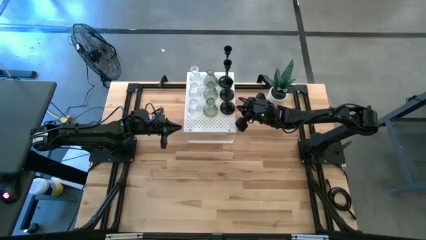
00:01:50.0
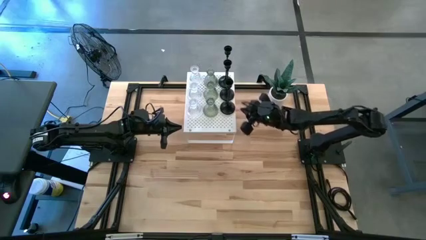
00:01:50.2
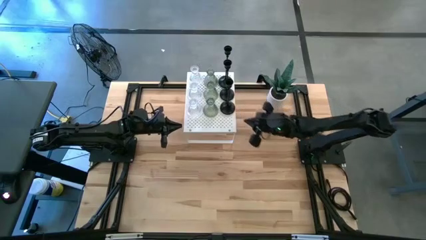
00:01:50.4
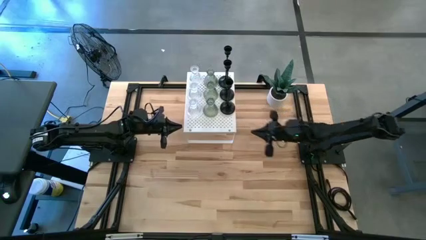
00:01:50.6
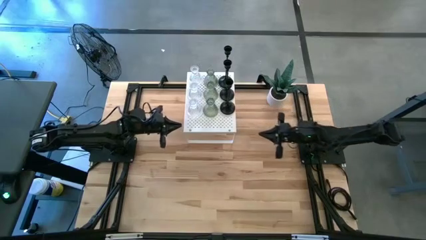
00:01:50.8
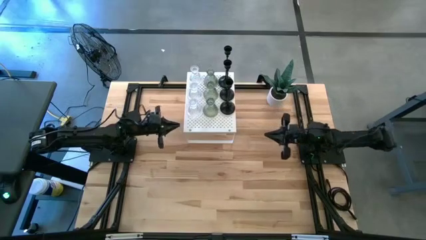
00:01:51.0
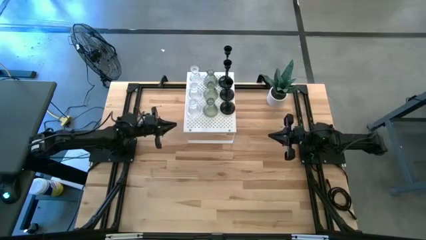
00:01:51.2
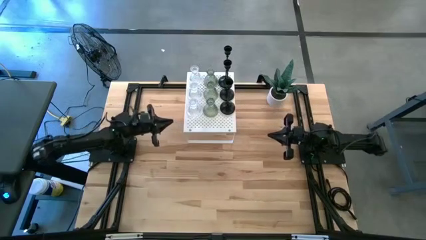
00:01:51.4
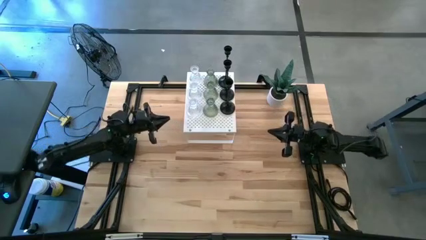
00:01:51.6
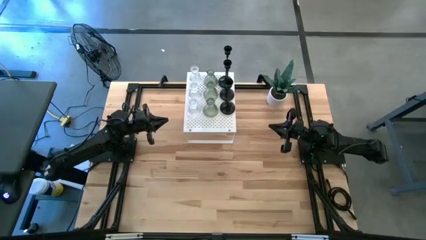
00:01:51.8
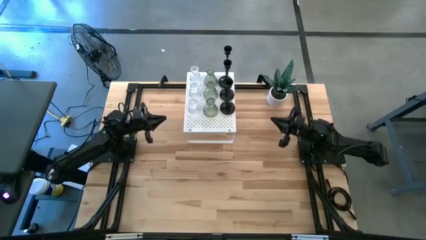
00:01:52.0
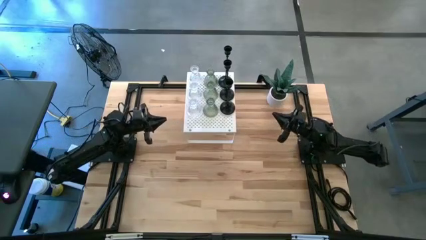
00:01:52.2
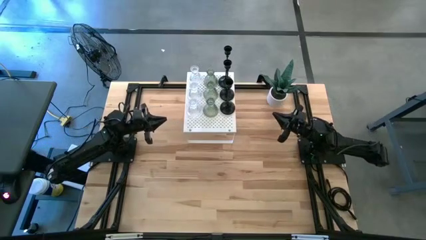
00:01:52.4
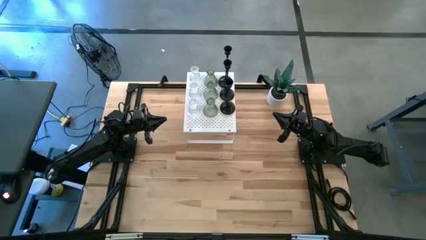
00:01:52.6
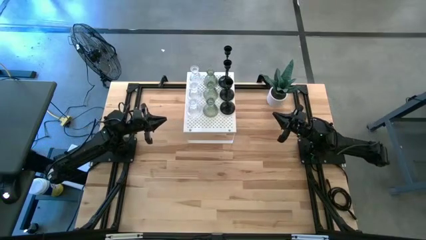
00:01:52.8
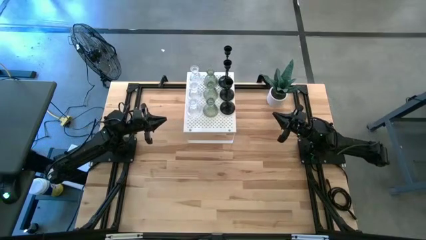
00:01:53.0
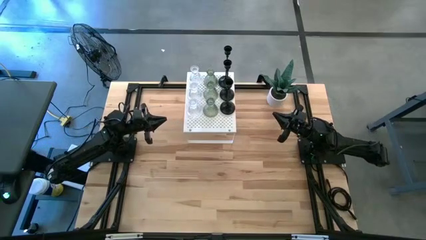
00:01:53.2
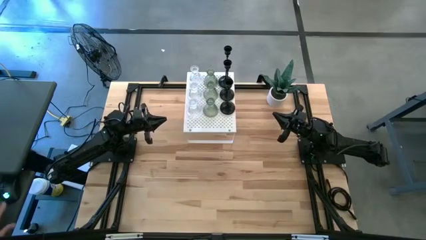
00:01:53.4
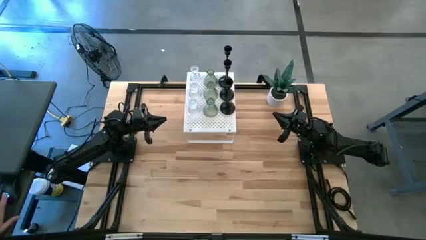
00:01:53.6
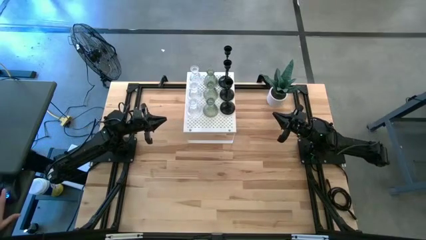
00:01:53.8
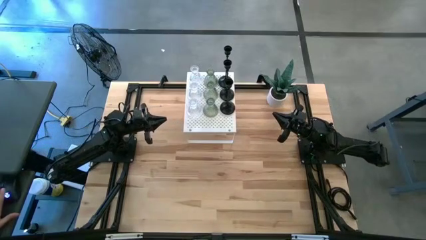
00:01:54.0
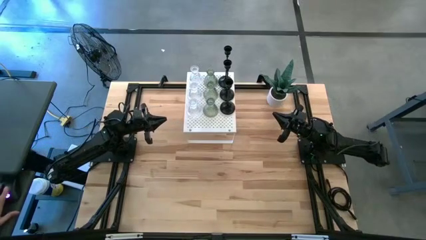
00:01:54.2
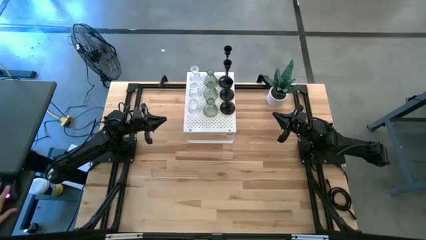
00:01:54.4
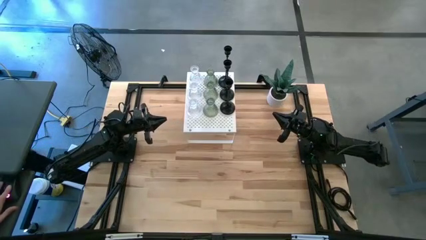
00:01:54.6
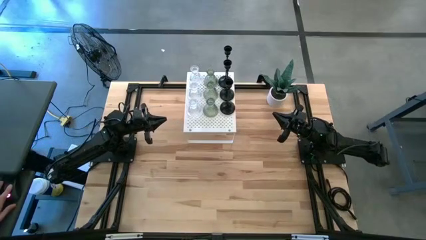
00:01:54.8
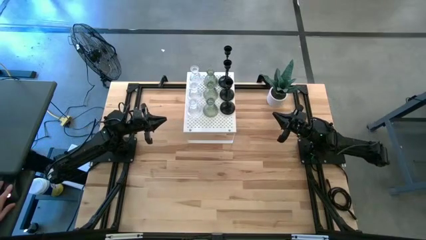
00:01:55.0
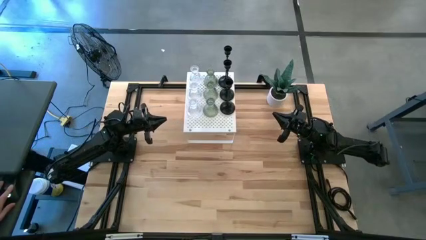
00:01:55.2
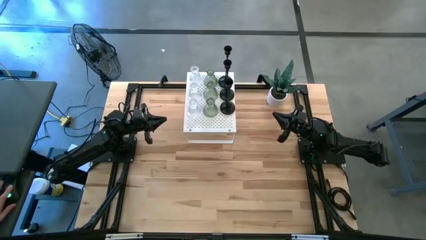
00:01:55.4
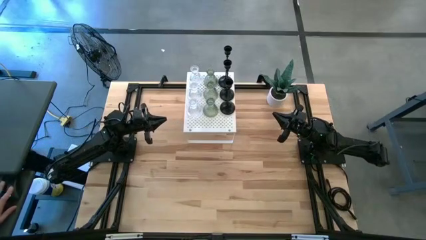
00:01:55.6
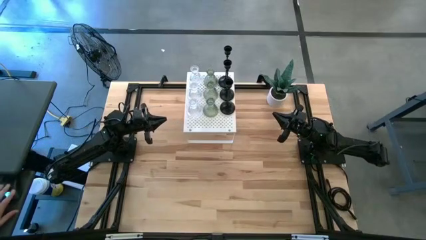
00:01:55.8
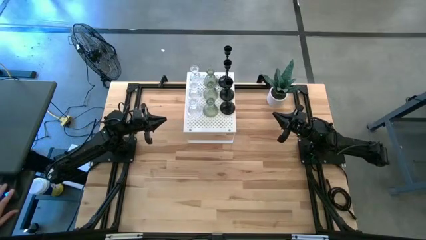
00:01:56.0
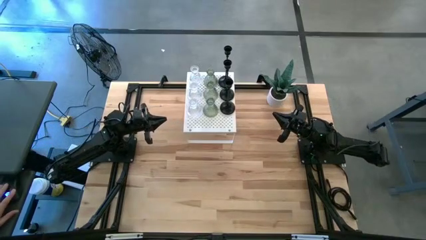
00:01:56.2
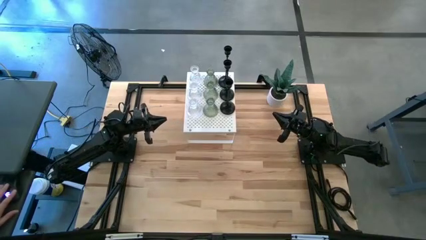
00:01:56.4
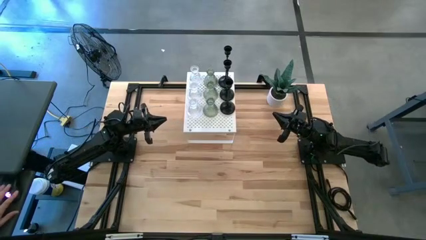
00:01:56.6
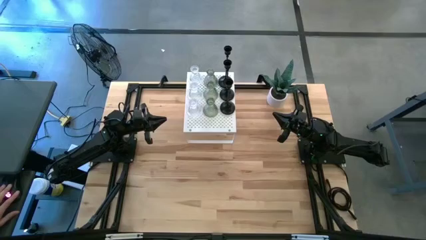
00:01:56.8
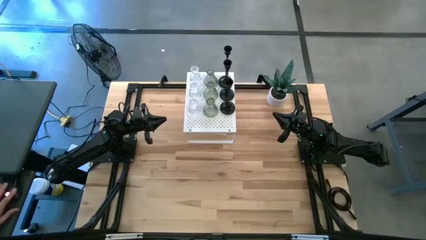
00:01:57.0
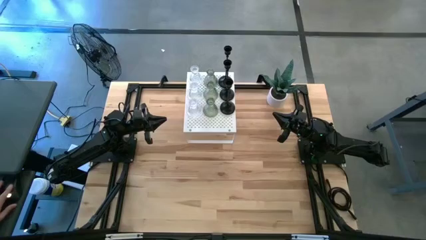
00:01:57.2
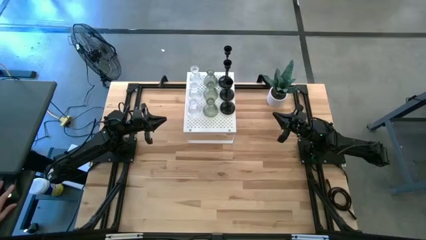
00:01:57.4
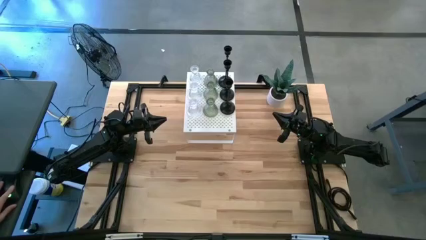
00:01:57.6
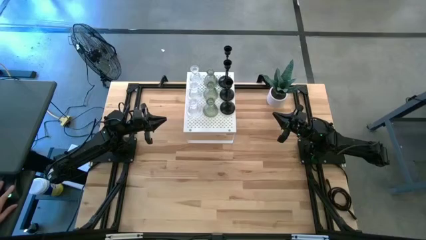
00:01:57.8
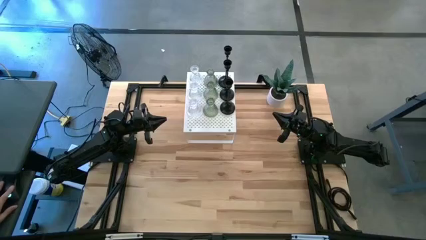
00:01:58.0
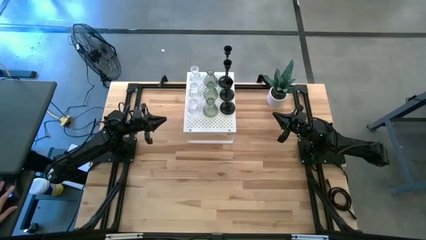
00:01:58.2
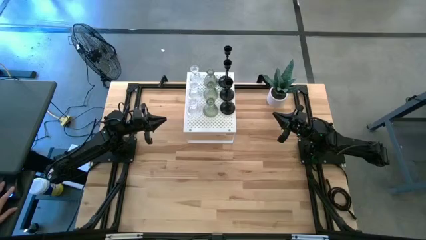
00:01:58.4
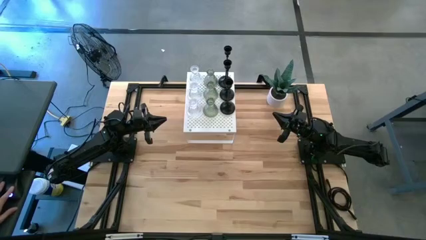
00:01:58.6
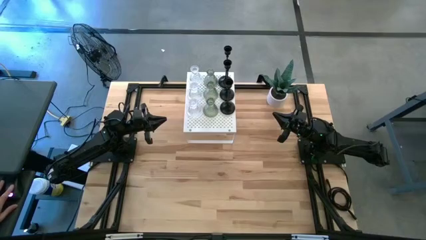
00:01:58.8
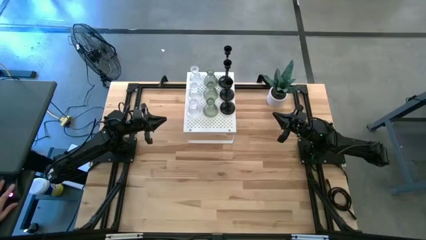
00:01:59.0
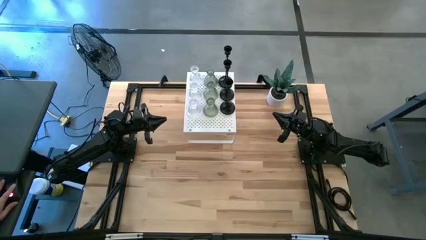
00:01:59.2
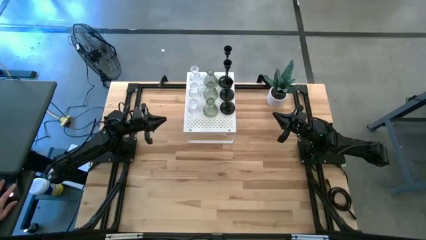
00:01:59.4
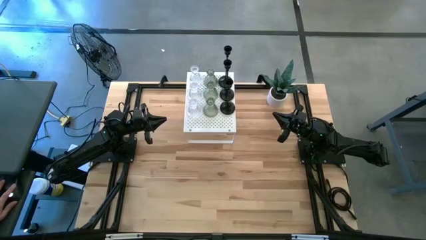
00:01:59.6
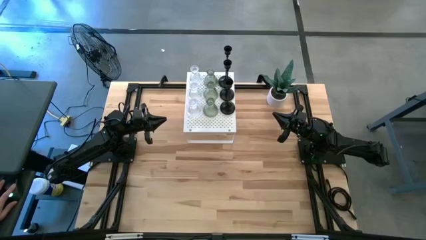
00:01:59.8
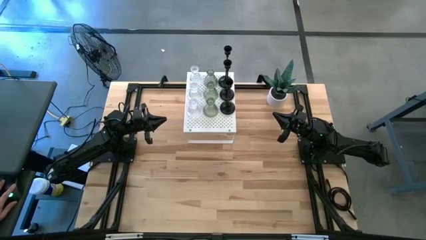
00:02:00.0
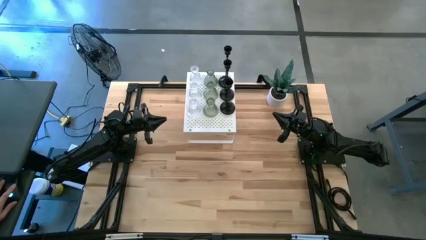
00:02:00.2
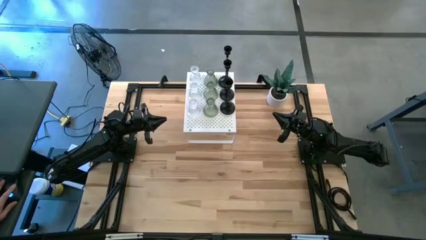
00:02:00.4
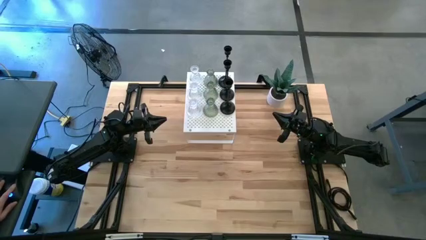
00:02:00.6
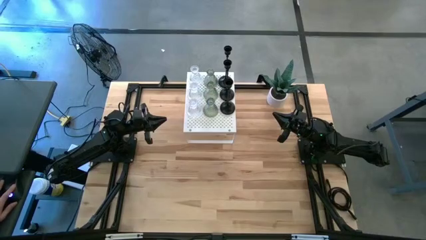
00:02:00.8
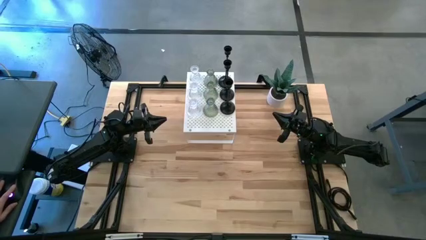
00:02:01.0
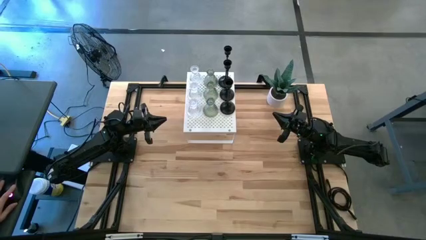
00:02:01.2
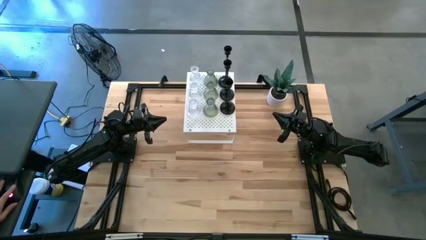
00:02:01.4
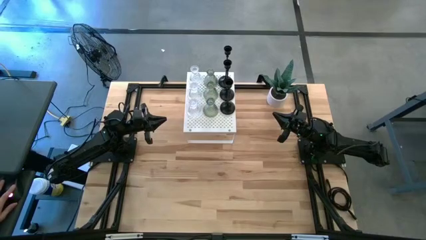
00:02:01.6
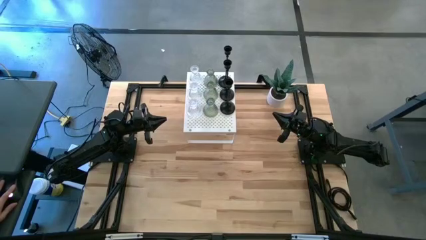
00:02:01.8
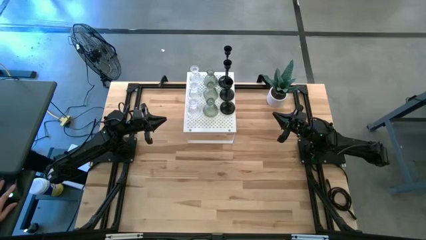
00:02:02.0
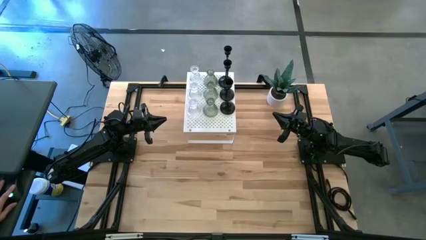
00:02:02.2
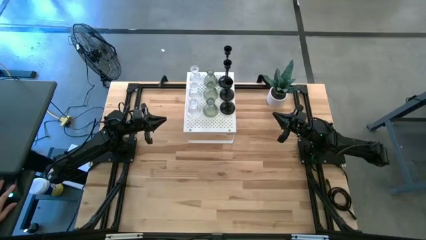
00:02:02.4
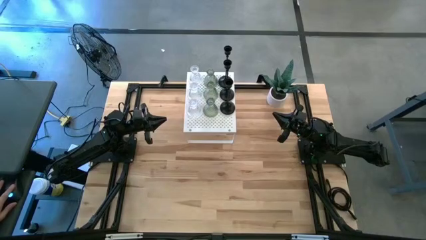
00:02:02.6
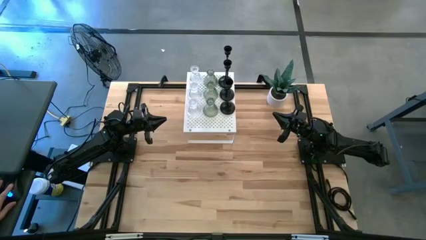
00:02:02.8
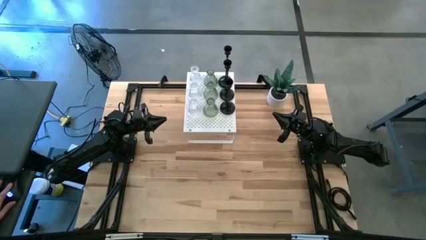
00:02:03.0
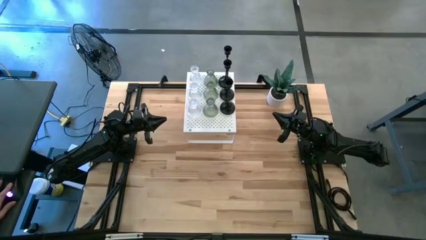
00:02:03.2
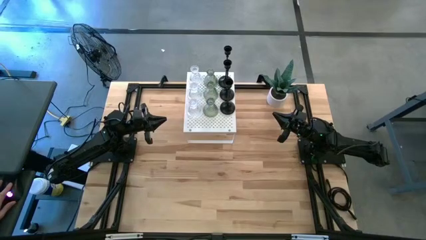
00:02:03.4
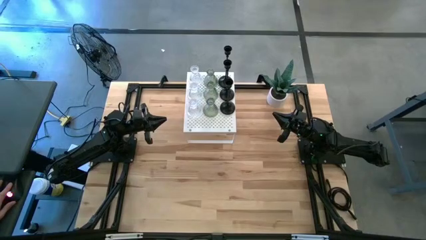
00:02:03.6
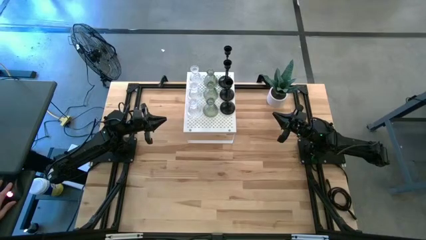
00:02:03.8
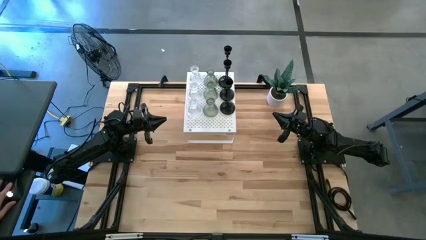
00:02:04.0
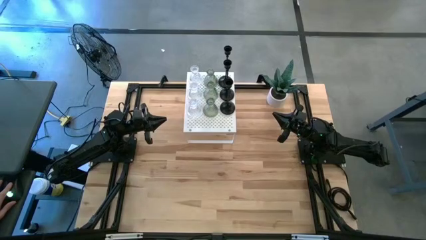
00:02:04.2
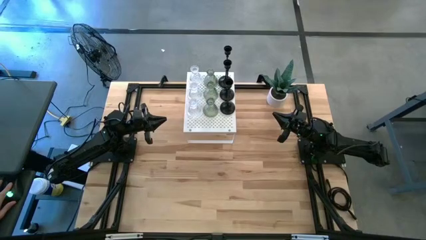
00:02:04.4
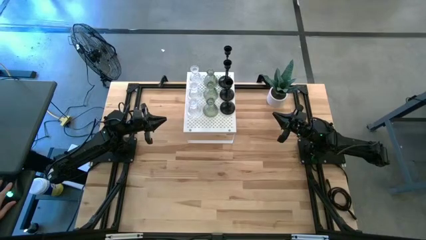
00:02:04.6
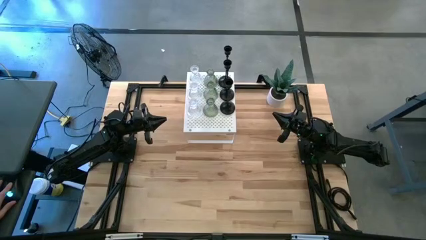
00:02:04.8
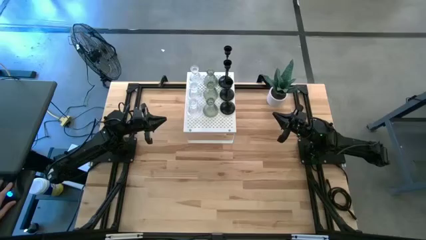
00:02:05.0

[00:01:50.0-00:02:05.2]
Task: Pick & Place candle stick holders
Return to Home Position
